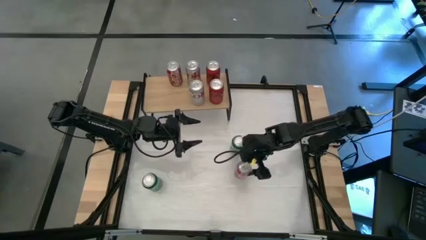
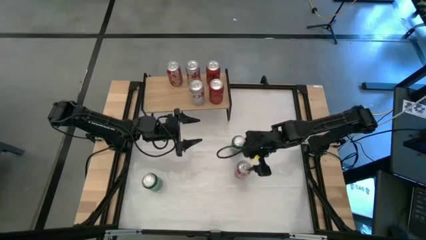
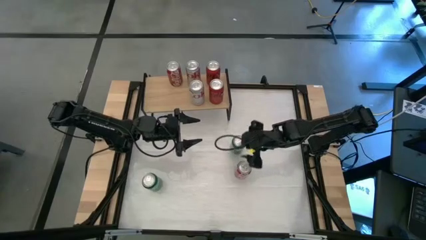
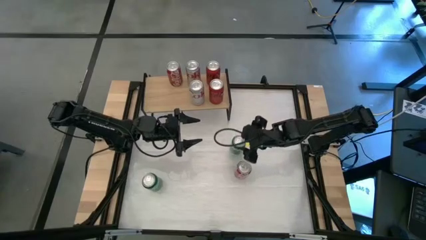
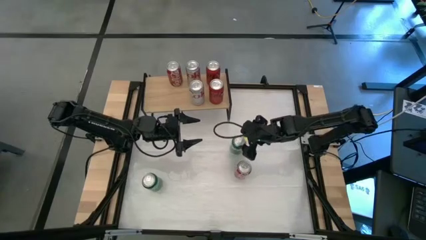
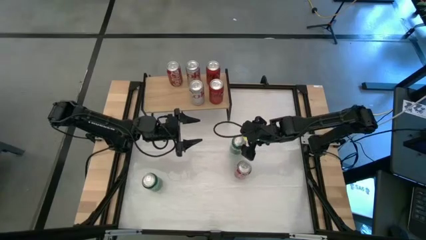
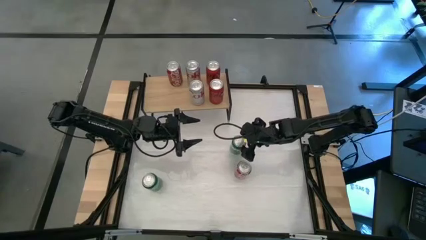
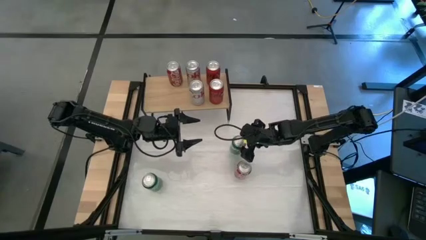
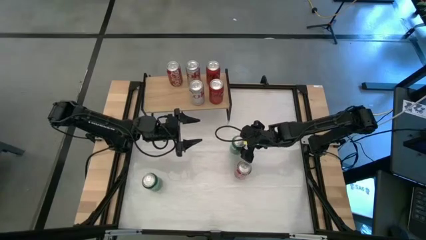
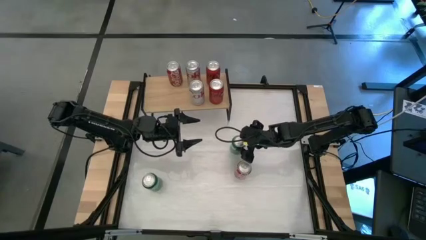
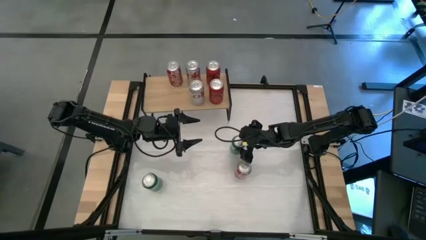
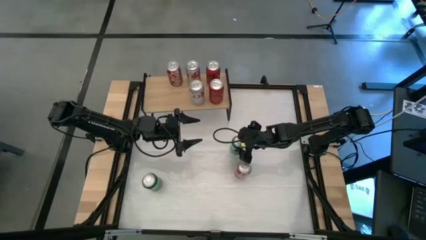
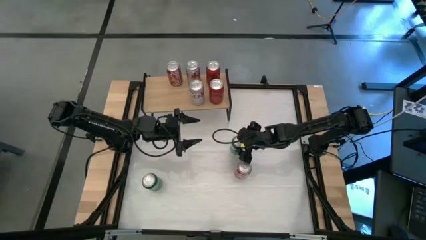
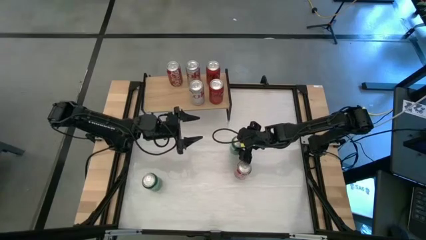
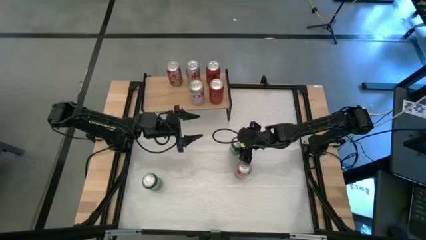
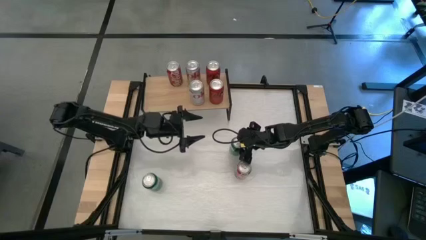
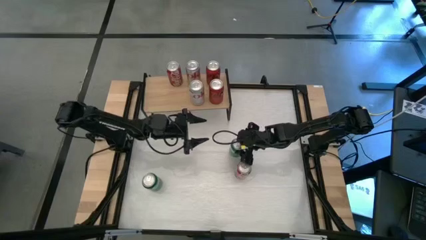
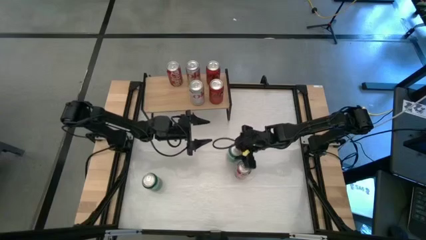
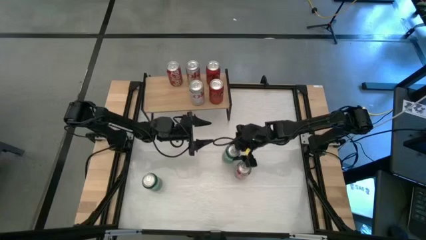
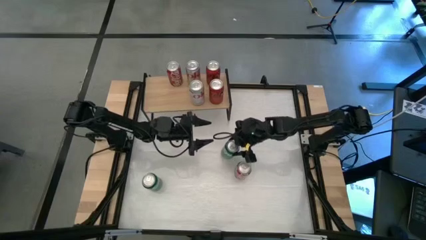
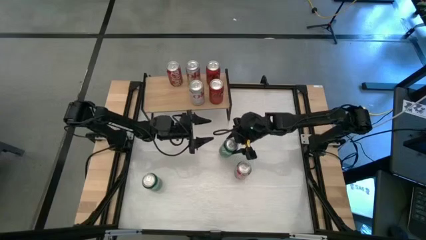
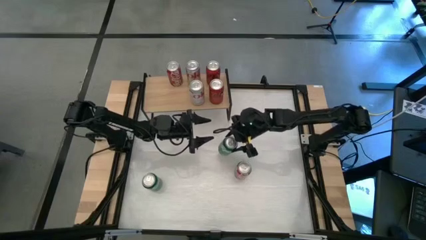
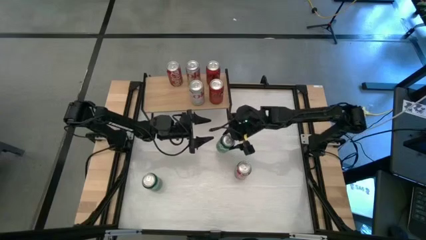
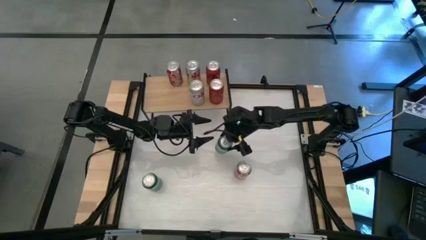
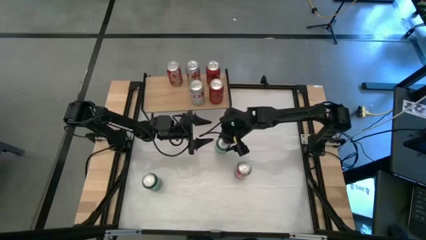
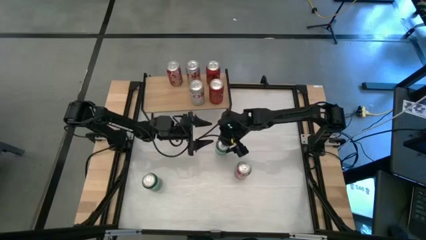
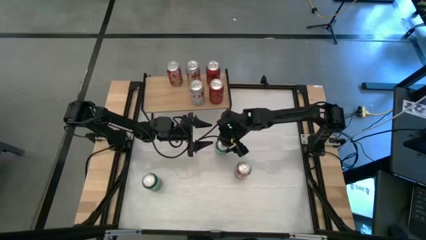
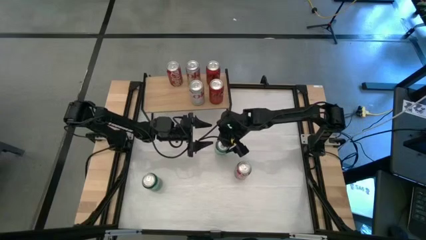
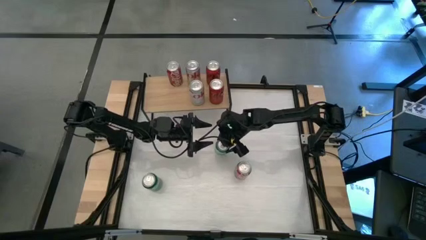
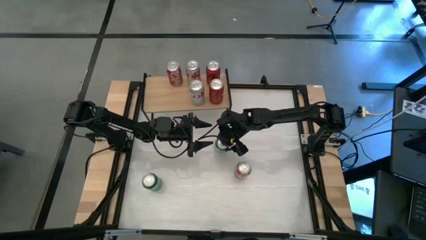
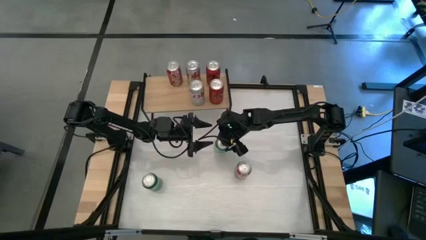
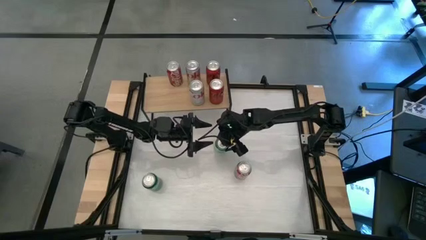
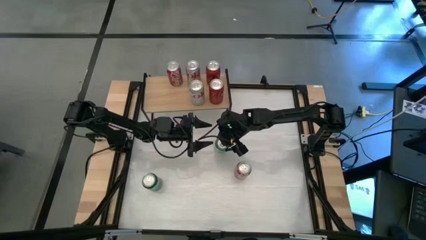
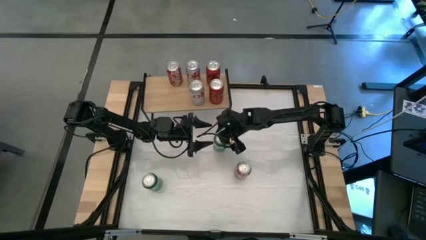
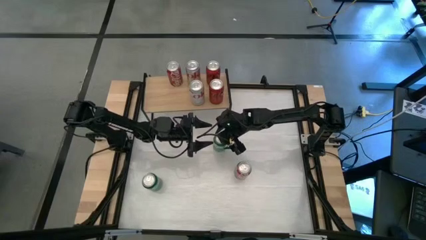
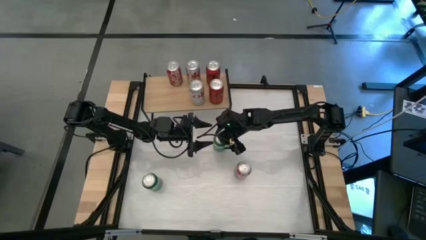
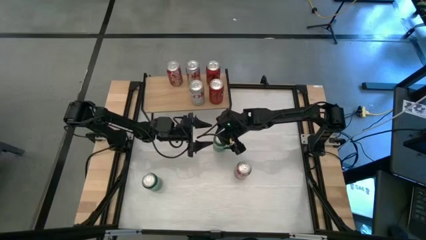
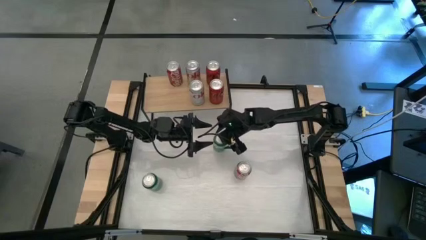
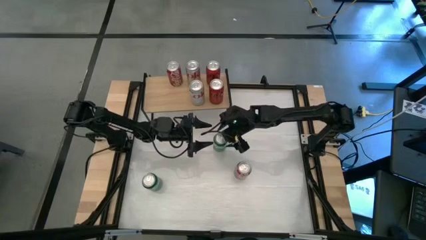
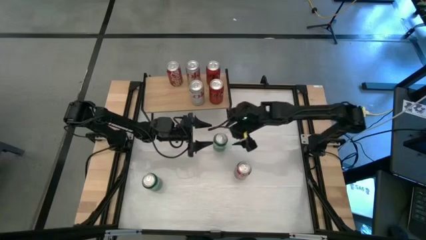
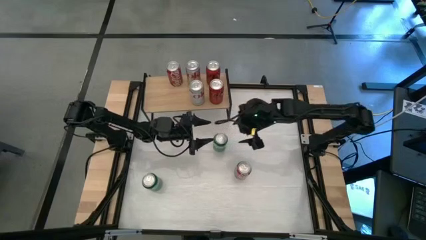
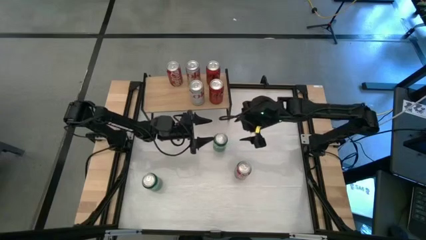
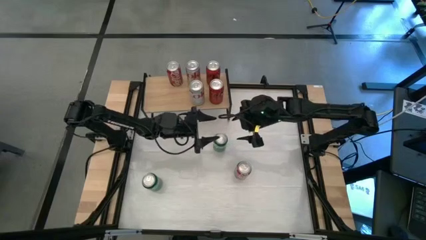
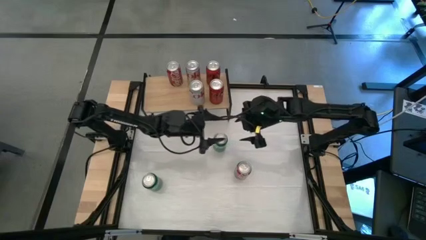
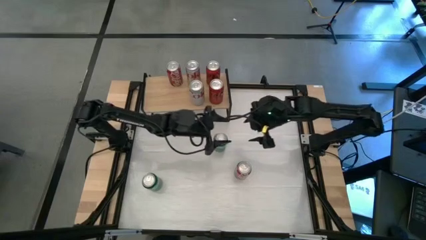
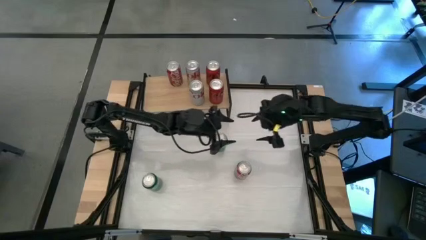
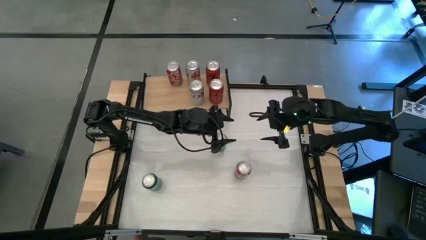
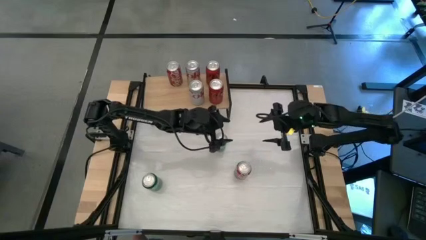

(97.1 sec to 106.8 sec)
Task: Place canned beverage on shelf
Put the right green soda can on the shelf

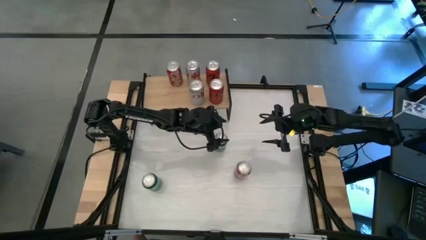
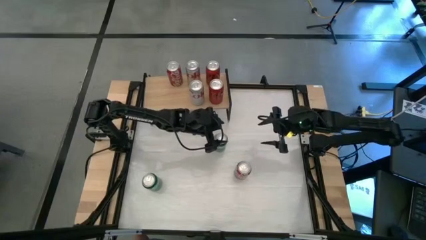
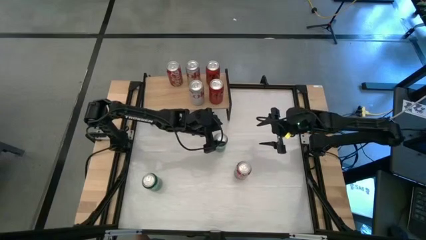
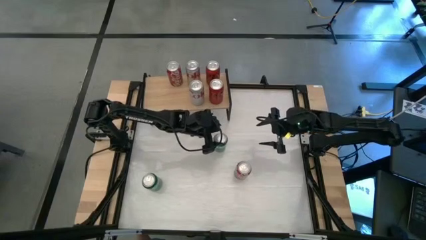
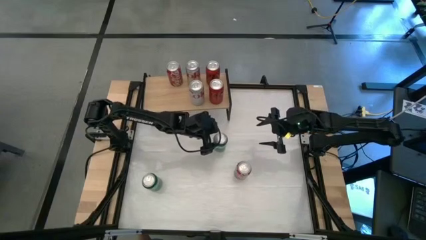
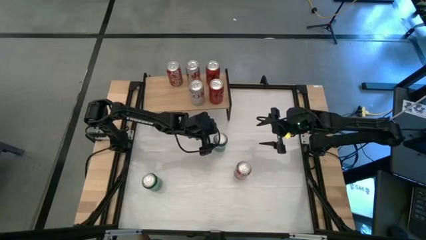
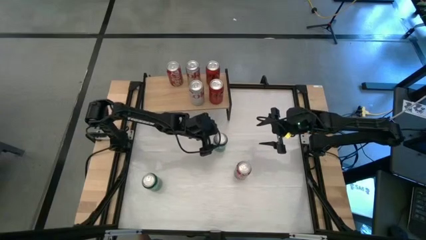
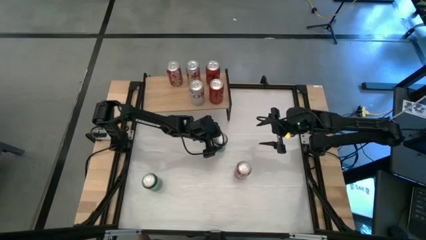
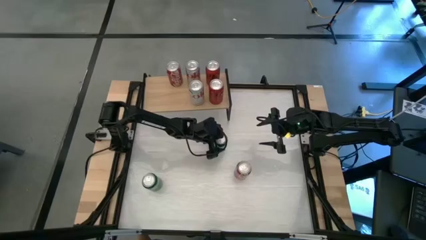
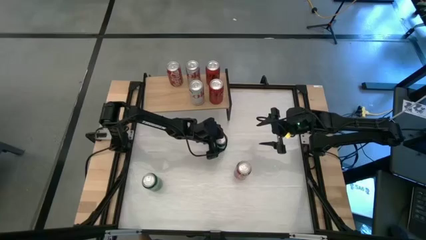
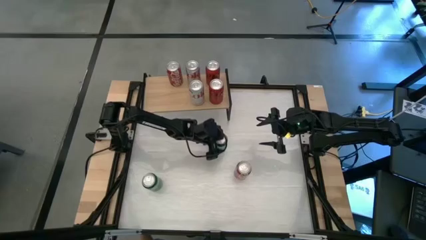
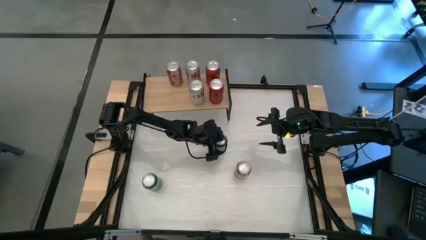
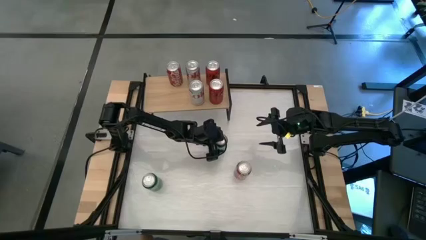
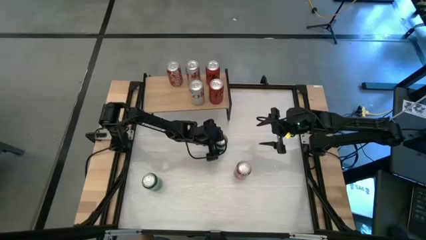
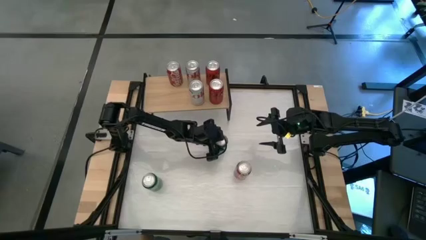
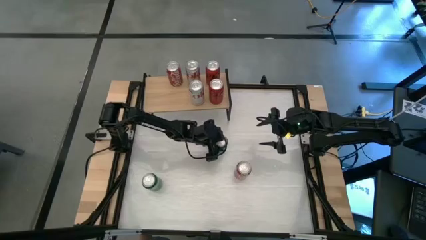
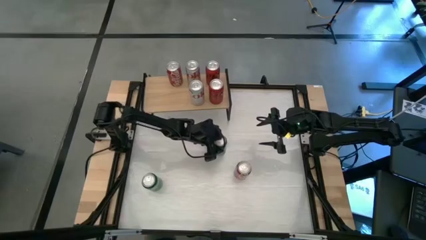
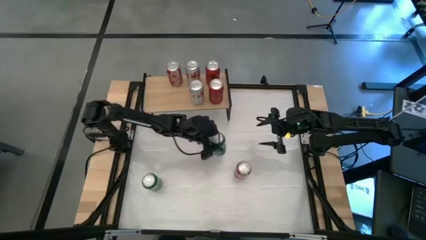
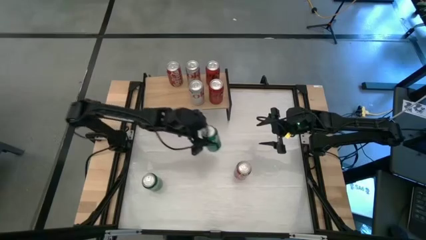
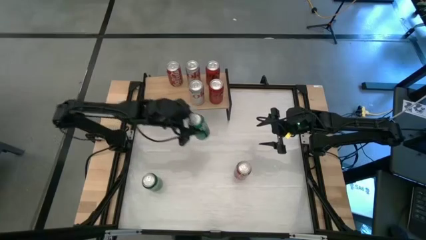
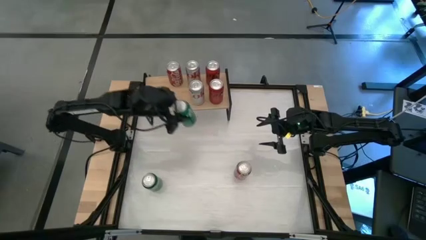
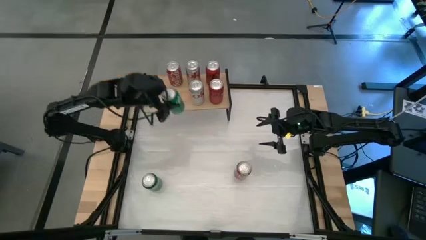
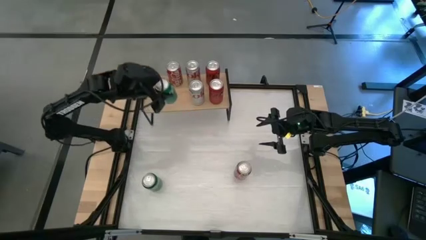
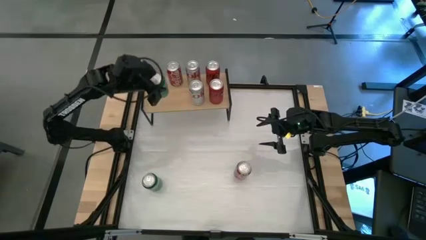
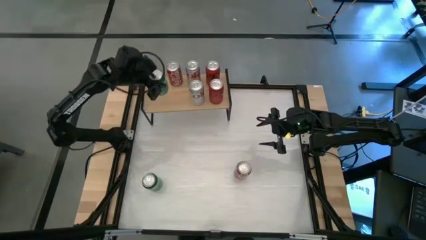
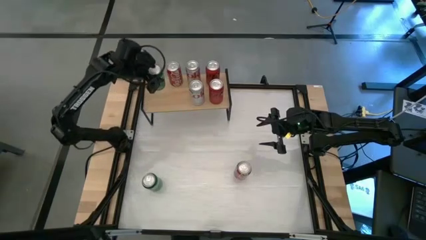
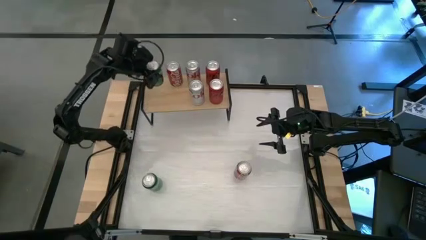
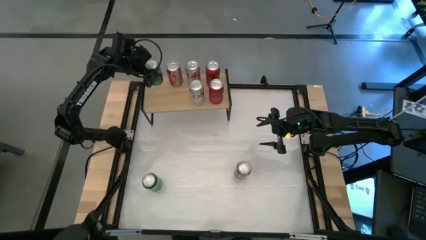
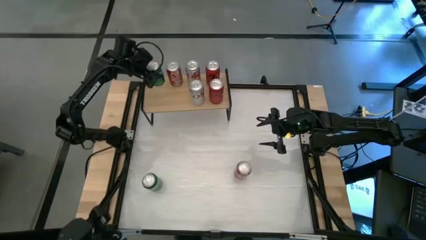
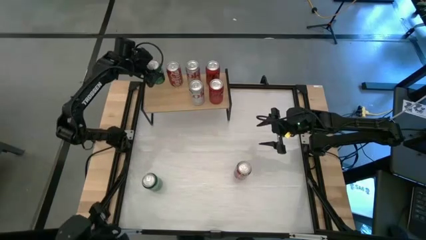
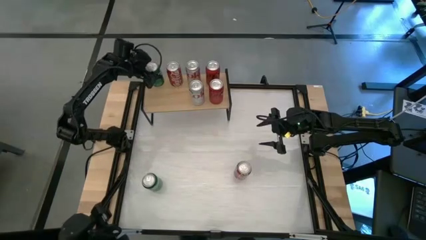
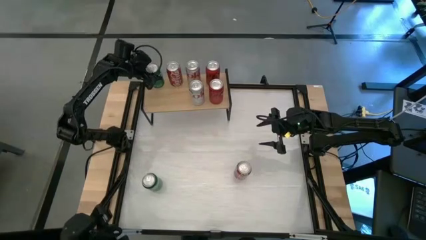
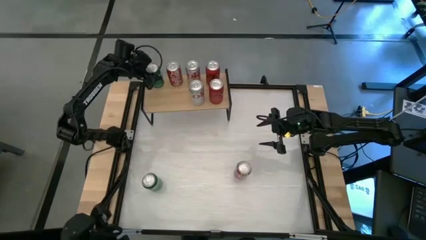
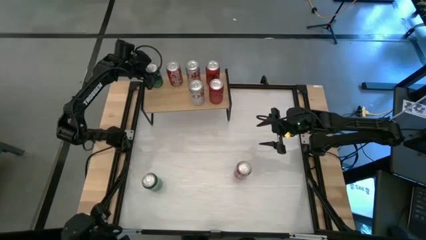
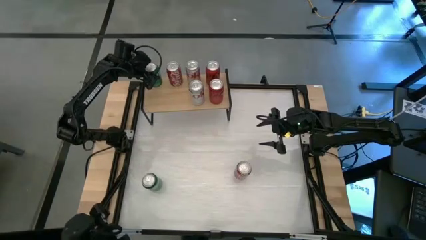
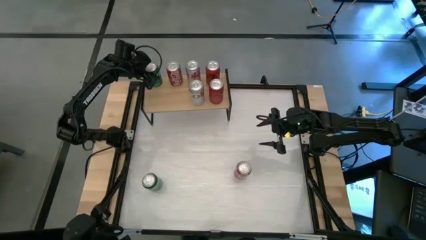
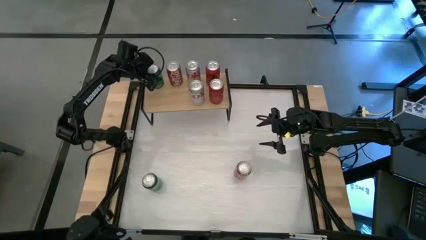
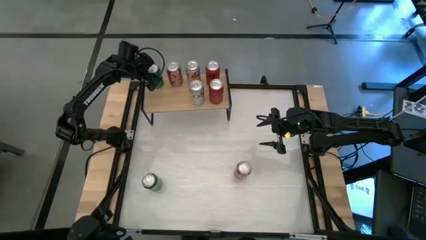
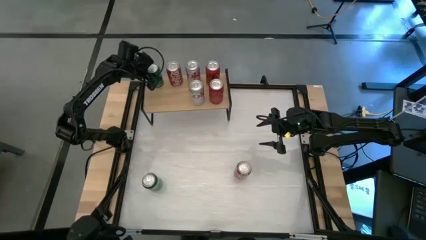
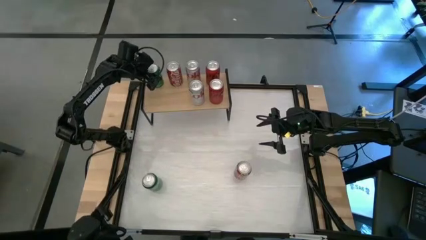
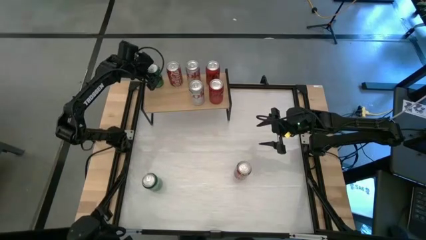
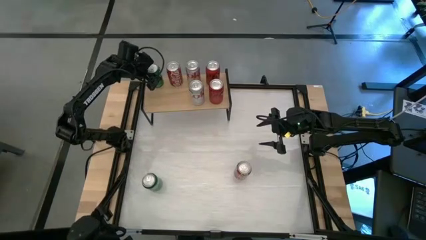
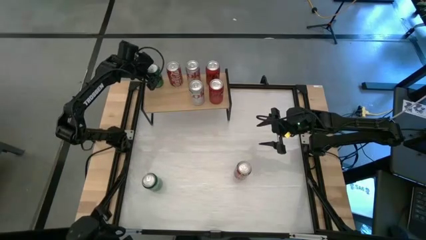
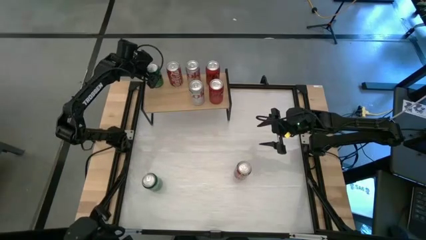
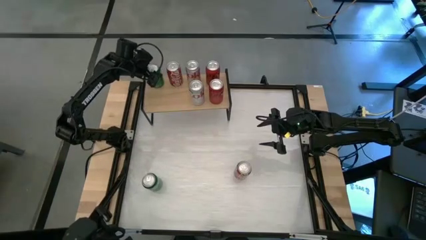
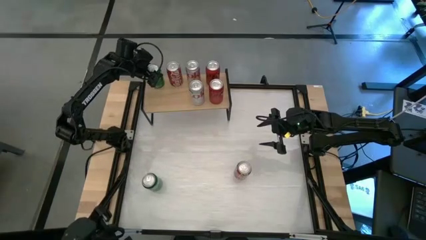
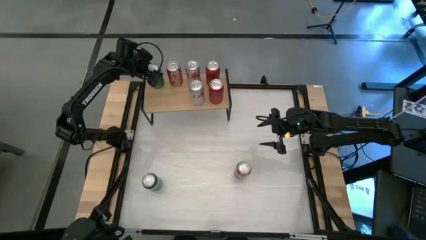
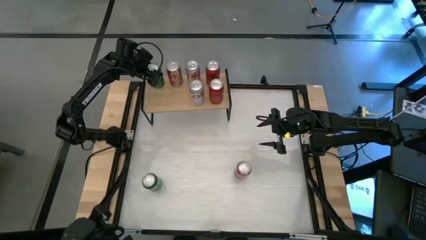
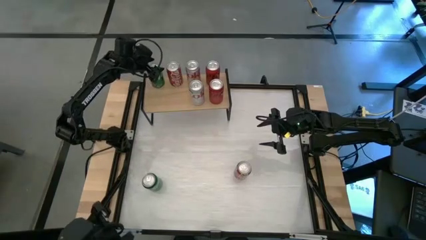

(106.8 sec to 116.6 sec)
Put the right green soda can on the shelf
